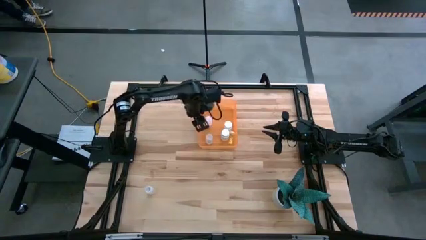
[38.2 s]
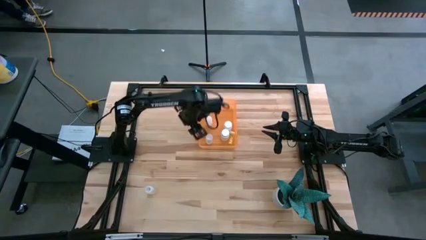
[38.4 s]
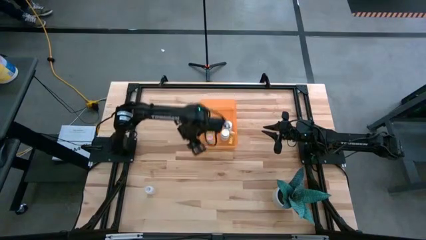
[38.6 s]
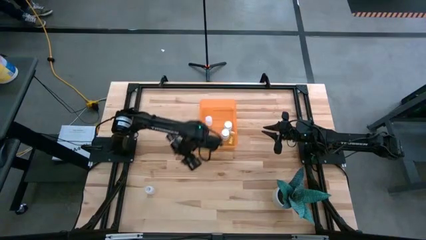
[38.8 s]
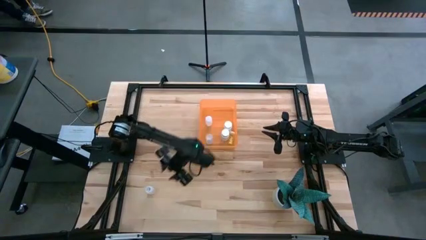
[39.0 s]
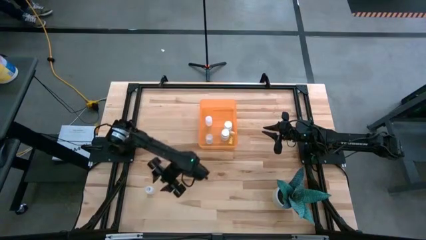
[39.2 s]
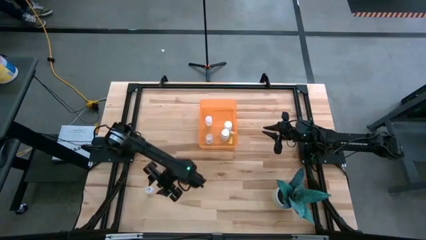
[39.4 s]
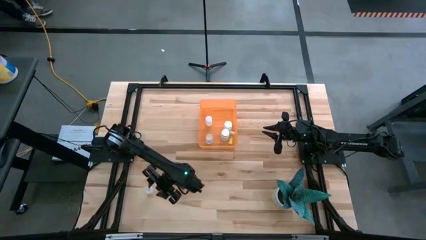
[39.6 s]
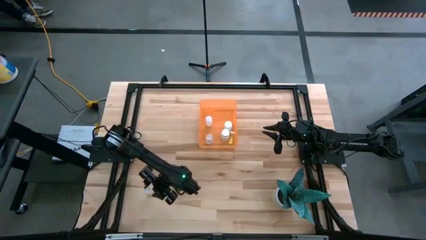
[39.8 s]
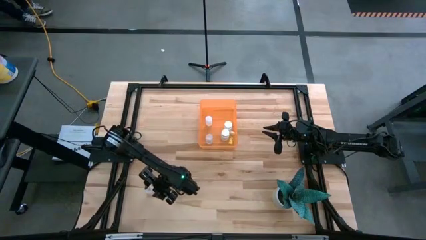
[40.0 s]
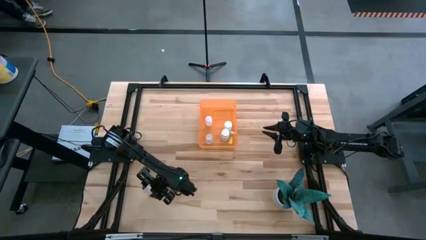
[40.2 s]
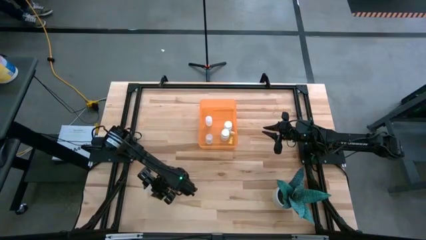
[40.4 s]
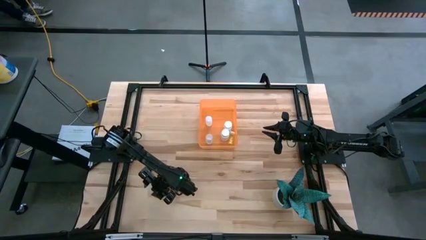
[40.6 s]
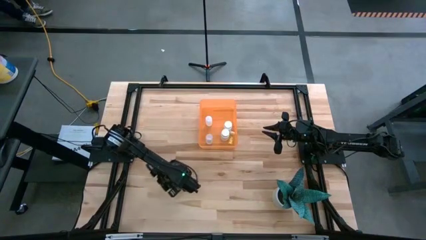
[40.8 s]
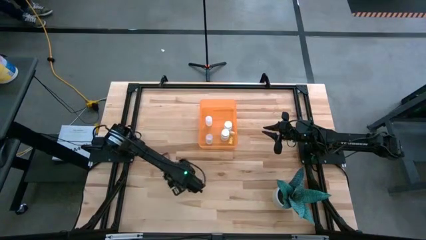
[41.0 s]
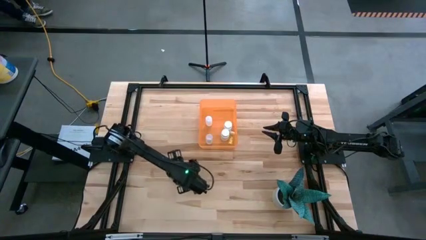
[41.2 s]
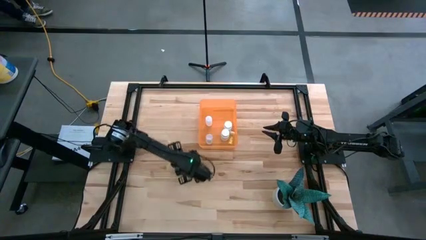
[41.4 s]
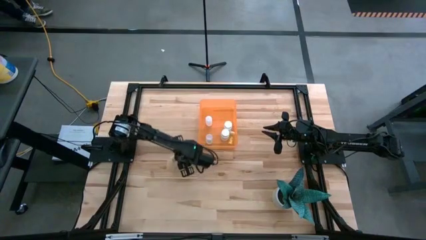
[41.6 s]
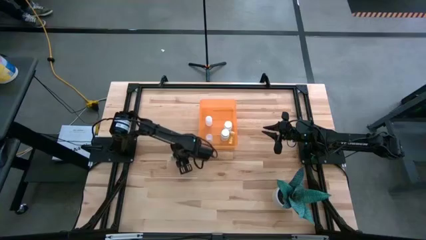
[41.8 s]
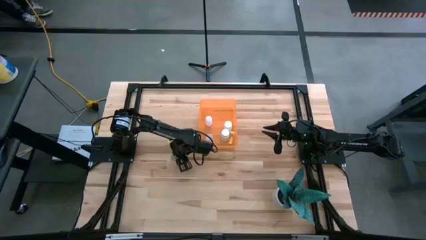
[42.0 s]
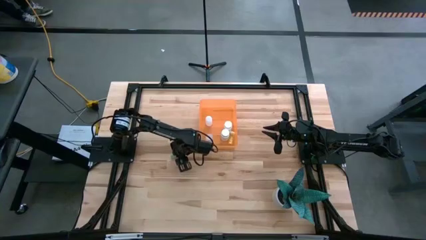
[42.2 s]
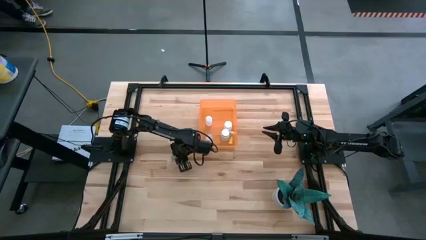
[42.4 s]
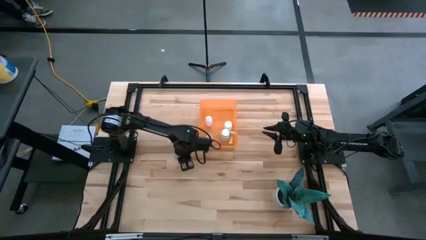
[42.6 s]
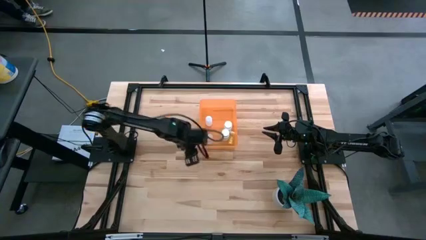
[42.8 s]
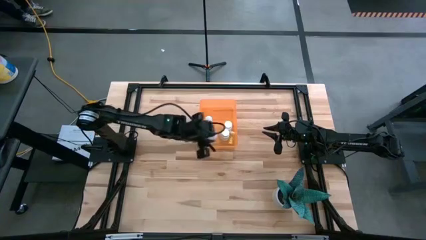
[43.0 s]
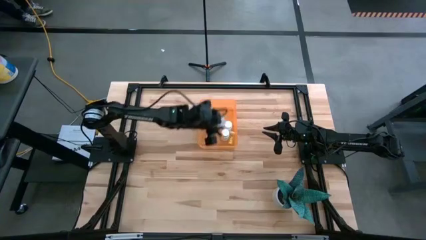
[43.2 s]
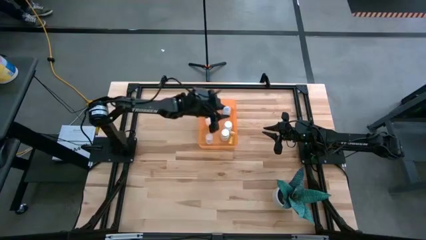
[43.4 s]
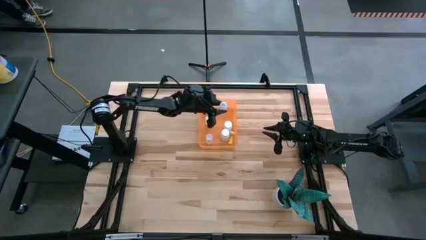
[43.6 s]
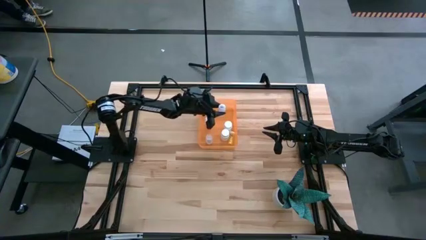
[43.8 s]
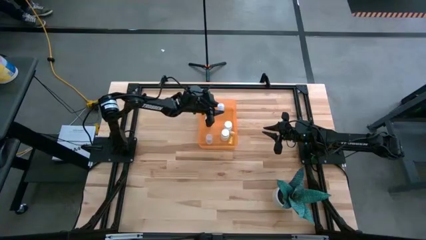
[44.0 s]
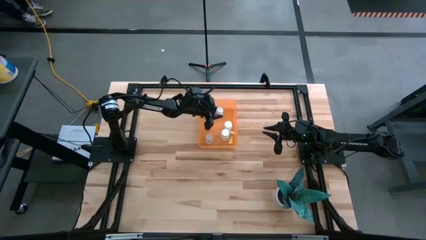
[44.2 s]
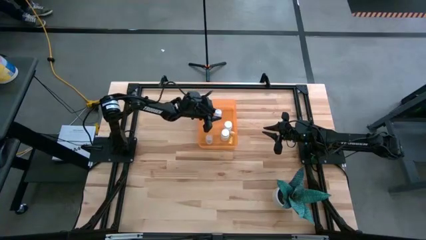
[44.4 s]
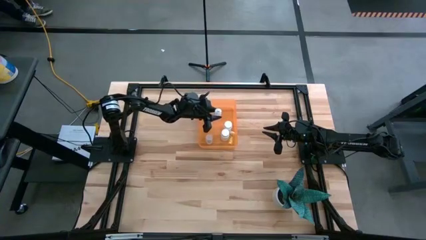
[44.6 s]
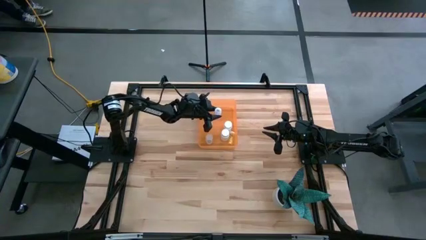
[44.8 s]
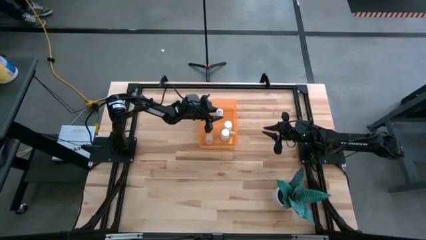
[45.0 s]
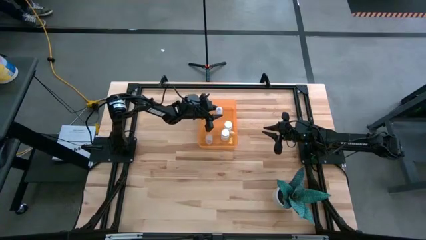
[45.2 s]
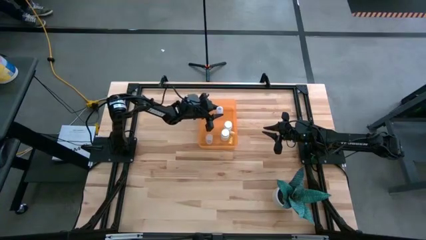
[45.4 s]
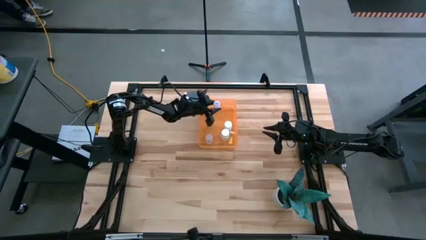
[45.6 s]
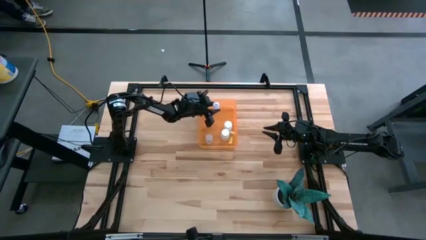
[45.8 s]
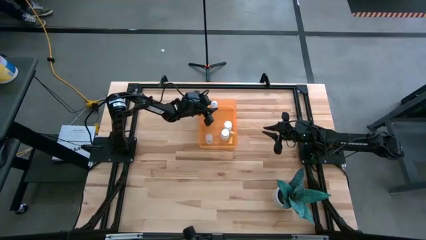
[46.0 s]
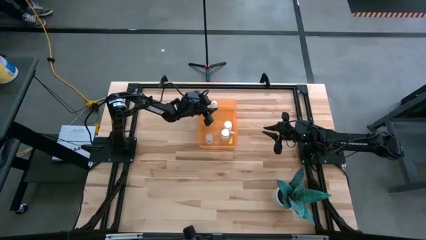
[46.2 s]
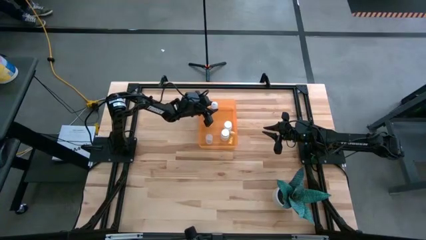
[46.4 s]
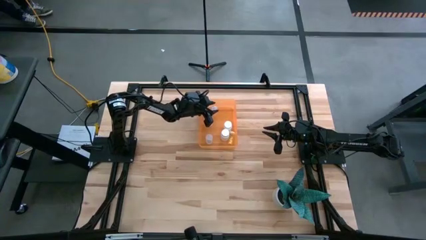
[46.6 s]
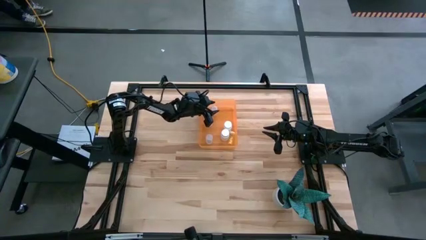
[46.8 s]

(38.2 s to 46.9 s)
Task: Pick and place pill bottles into a basket
Put the transparent plastic medicine bottle into the orange bin

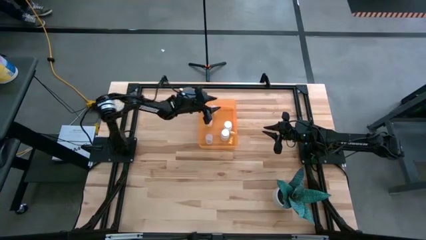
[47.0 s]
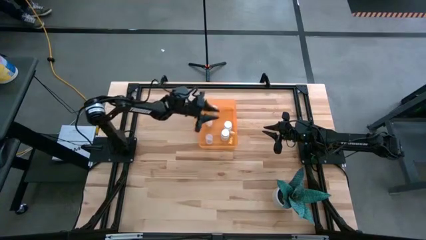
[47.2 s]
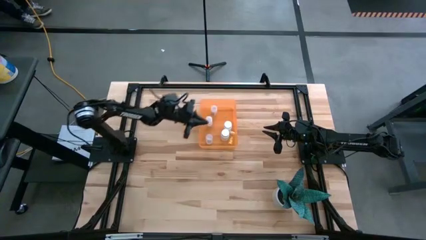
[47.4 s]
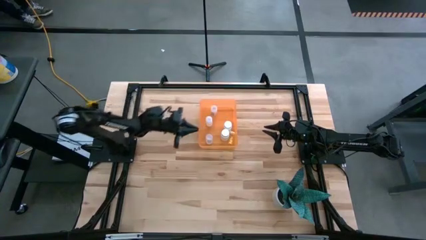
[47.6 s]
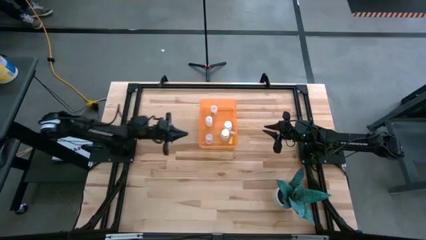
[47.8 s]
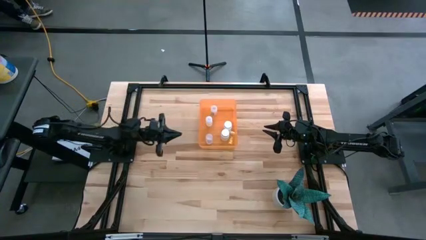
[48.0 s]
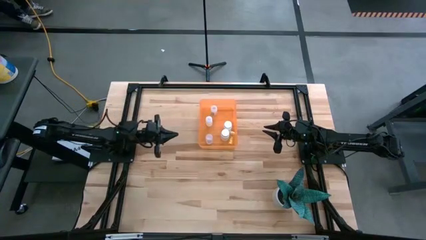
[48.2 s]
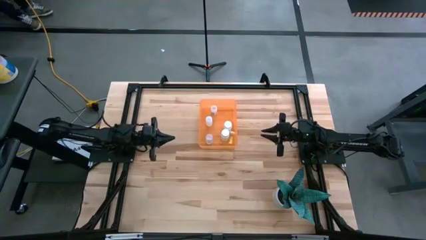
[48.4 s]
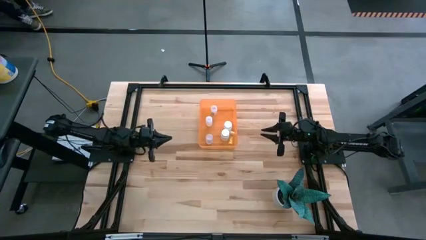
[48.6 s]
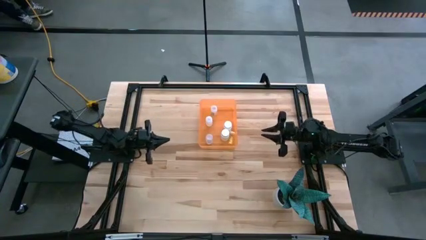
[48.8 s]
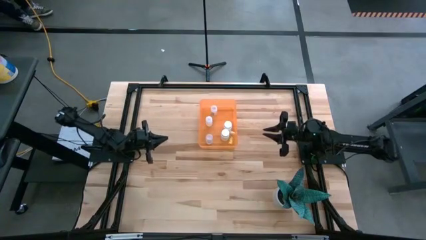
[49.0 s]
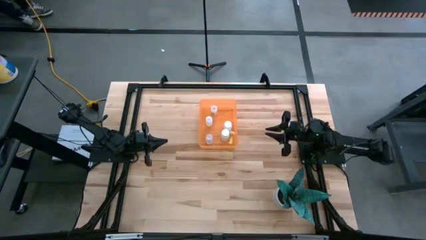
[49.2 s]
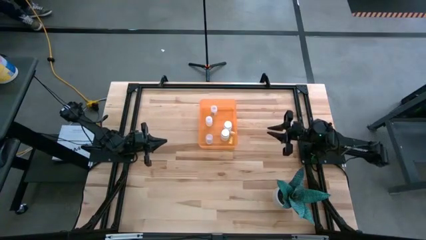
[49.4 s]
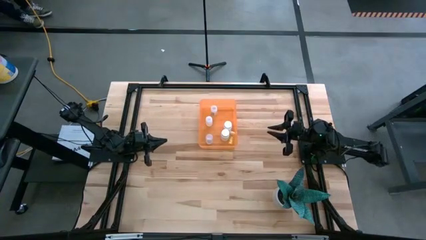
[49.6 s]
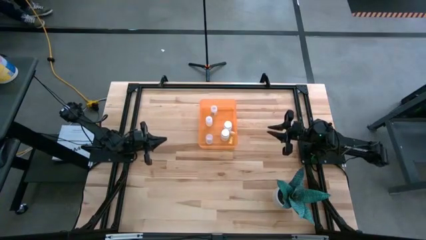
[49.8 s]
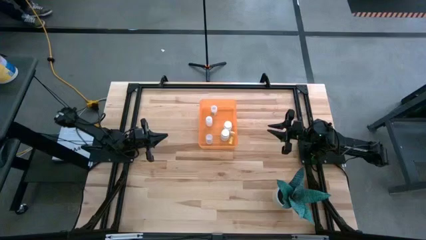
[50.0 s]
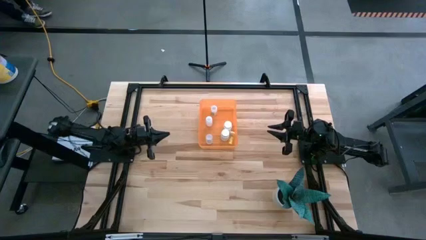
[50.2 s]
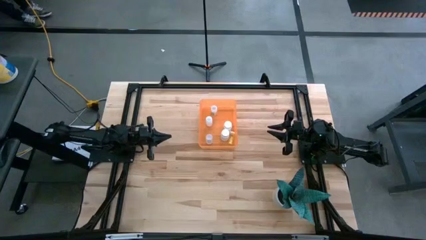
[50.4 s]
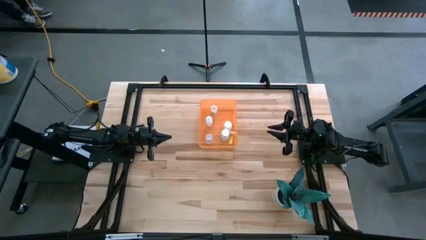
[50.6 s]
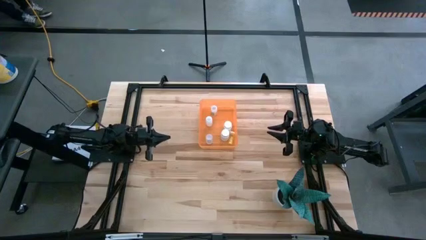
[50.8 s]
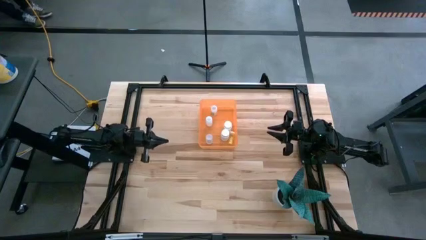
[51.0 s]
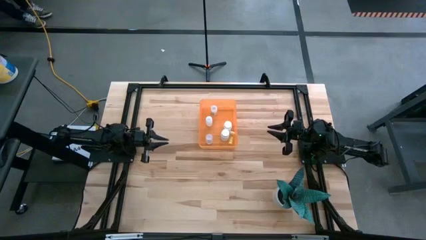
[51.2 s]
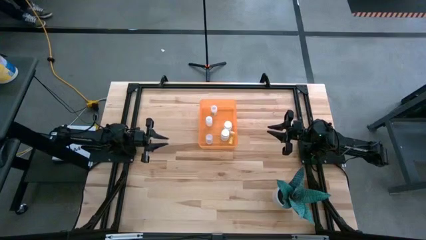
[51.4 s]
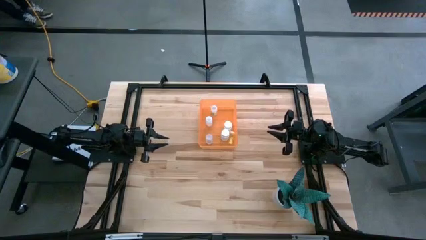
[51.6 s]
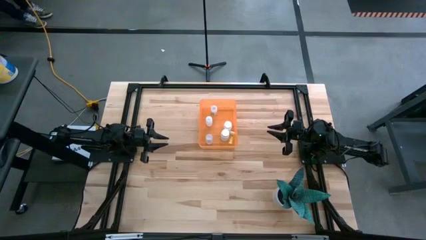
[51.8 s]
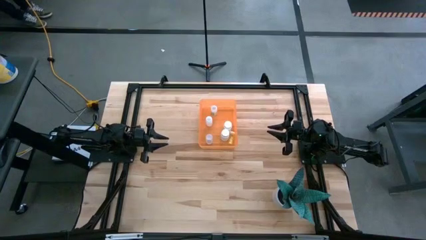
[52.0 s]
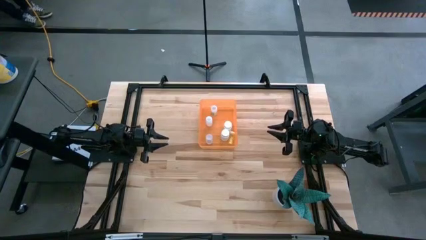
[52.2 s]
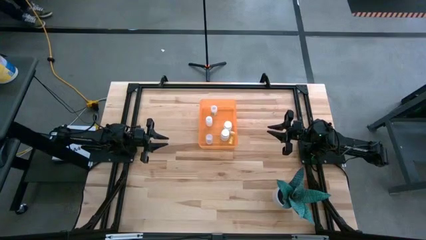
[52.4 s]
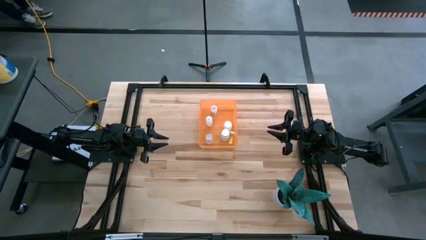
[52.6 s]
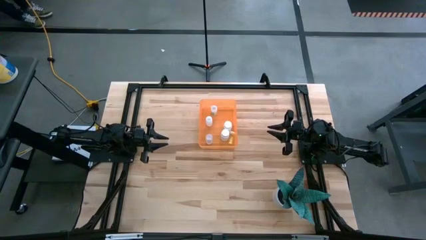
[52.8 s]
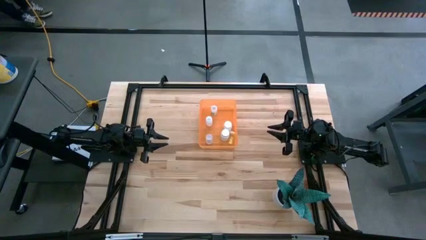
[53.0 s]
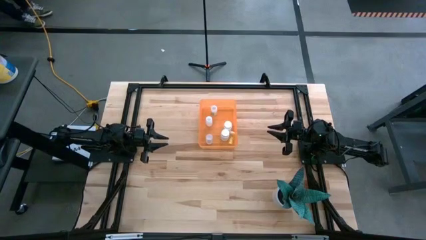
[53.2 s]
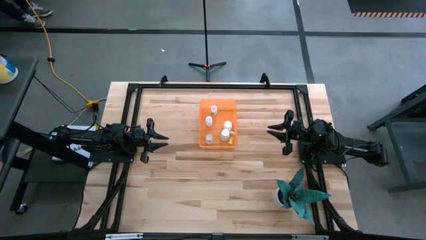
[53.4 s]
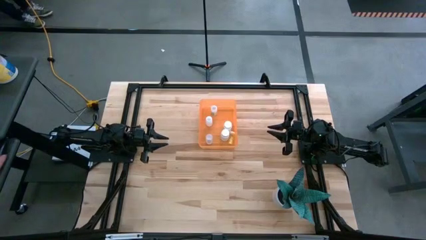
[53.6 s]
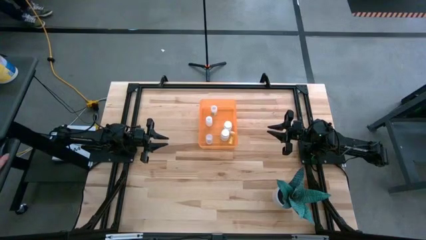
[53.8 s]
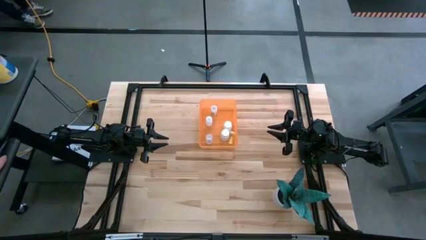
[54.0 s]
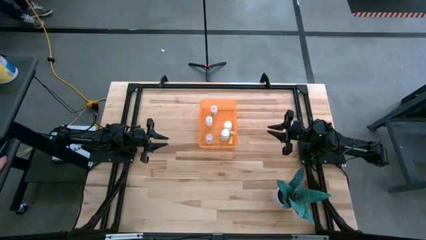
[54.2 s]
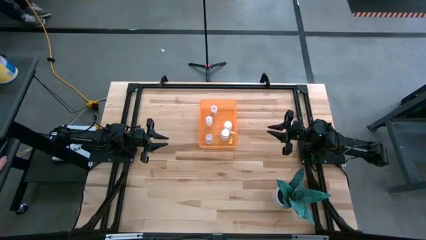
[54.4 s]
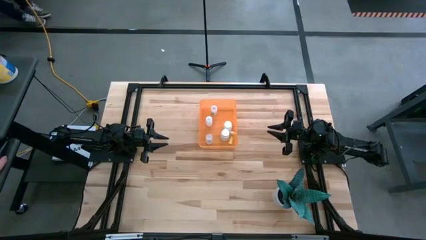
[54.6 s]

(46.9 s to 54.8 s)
Return to Home Position
